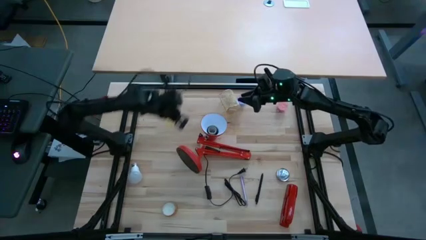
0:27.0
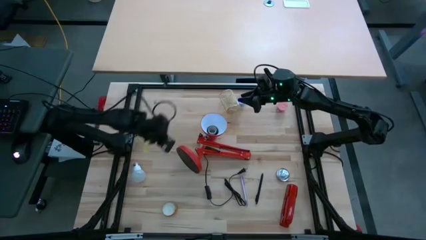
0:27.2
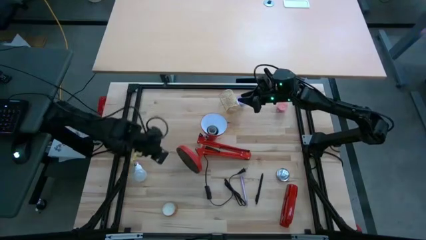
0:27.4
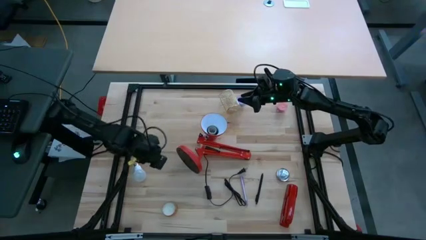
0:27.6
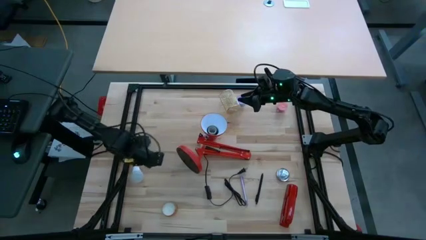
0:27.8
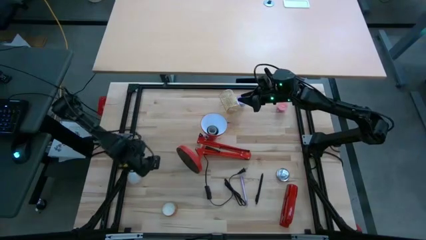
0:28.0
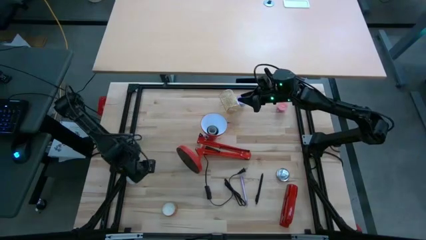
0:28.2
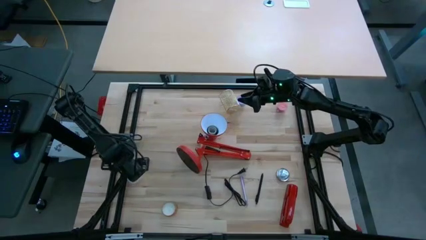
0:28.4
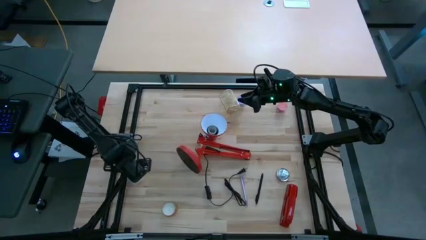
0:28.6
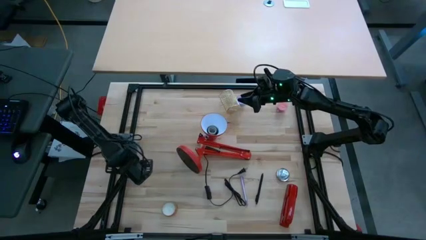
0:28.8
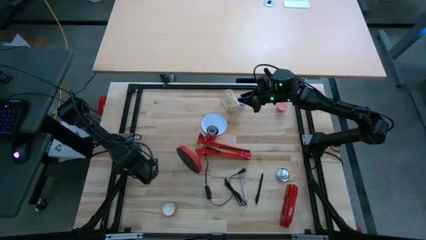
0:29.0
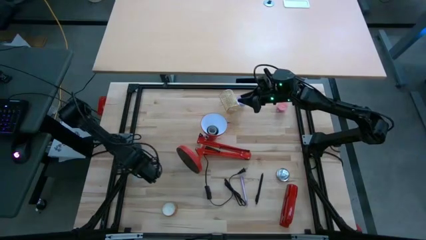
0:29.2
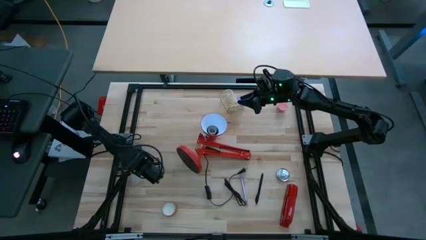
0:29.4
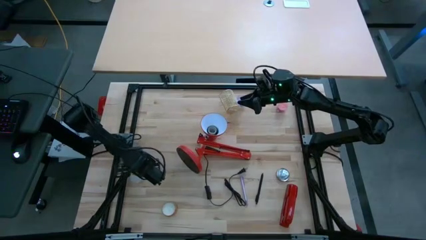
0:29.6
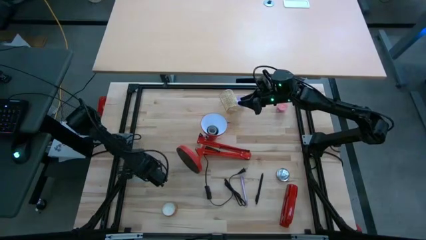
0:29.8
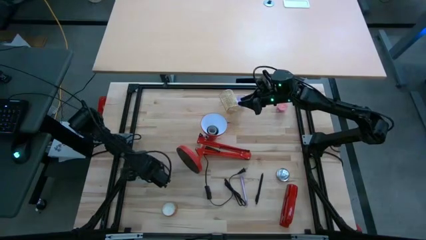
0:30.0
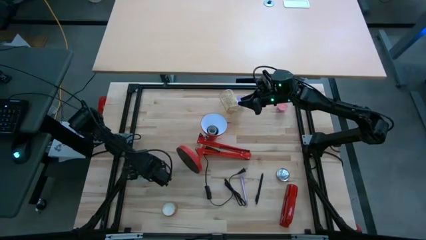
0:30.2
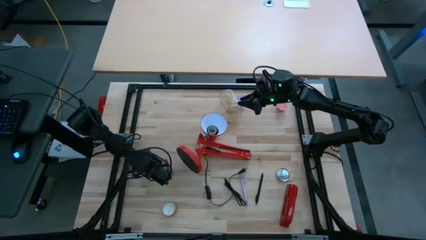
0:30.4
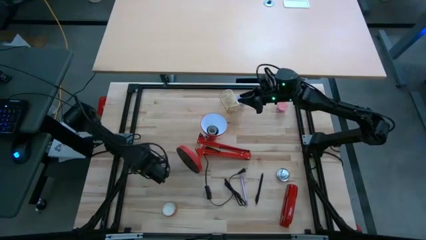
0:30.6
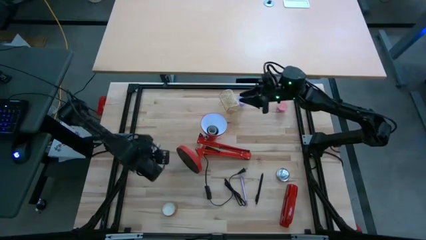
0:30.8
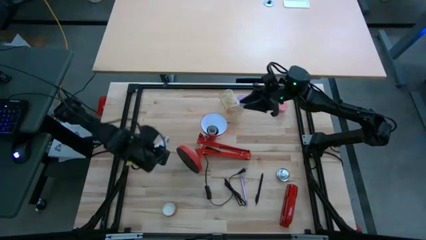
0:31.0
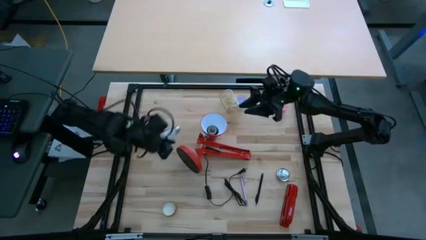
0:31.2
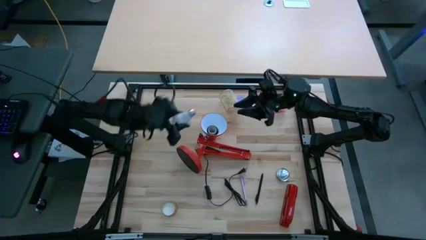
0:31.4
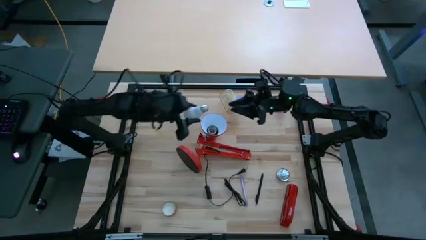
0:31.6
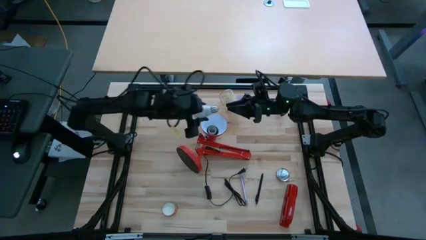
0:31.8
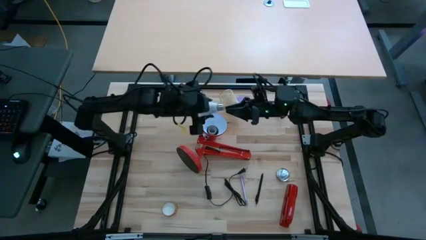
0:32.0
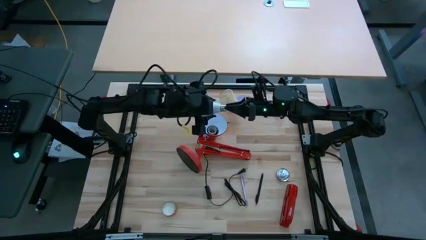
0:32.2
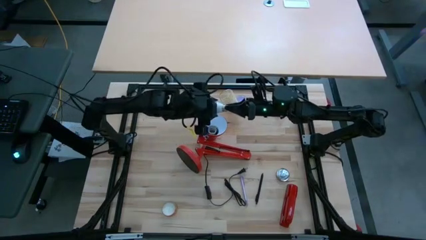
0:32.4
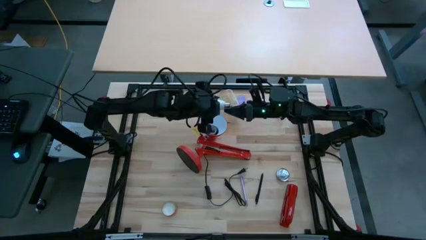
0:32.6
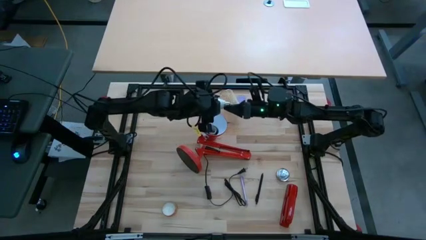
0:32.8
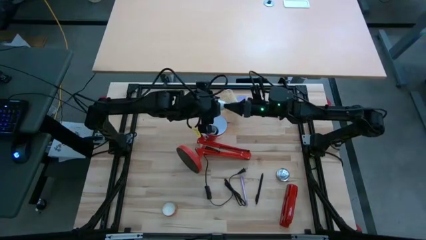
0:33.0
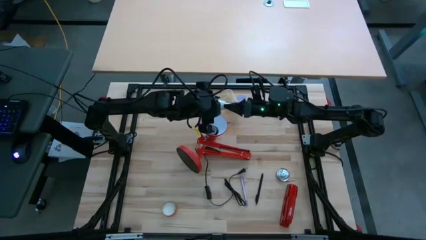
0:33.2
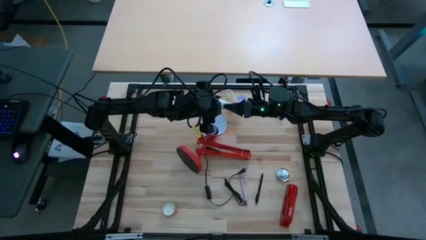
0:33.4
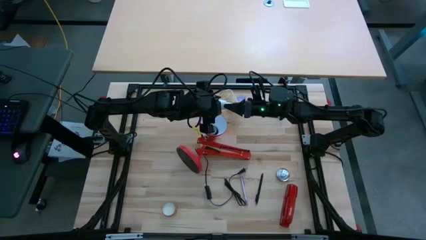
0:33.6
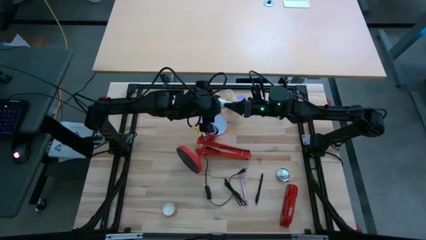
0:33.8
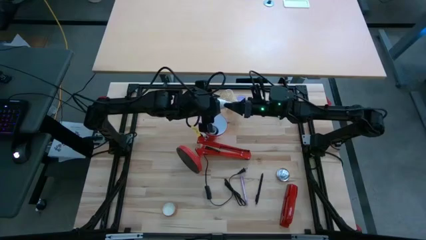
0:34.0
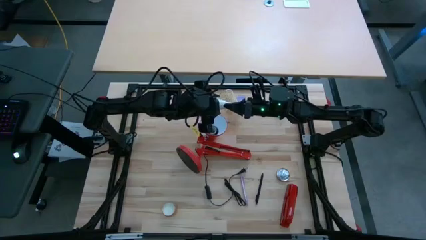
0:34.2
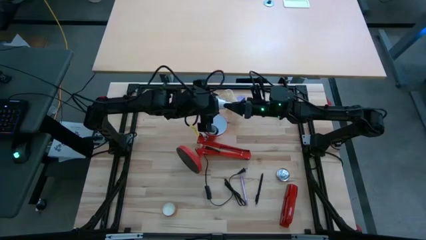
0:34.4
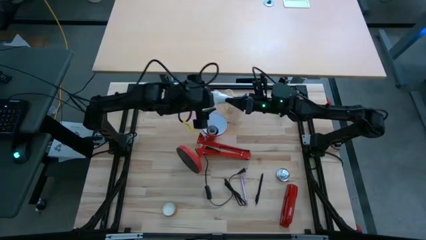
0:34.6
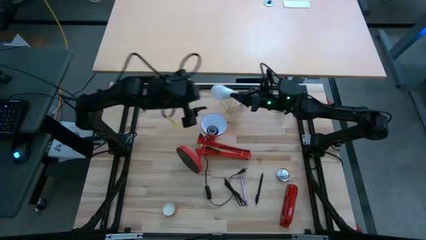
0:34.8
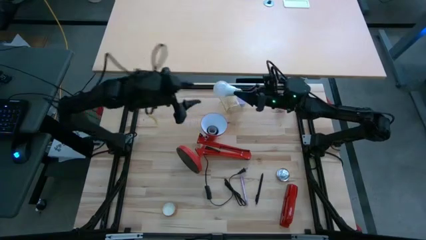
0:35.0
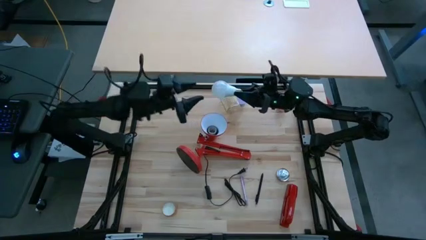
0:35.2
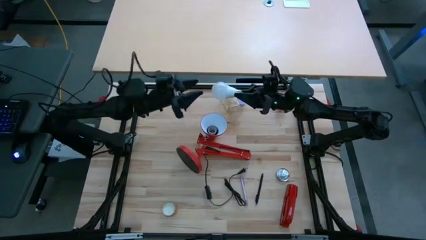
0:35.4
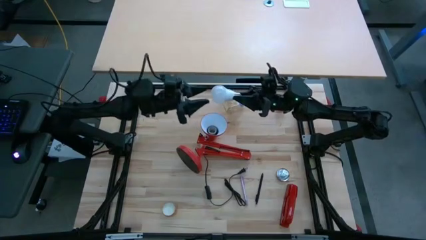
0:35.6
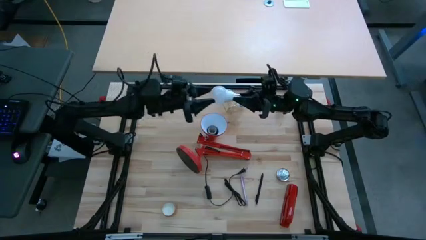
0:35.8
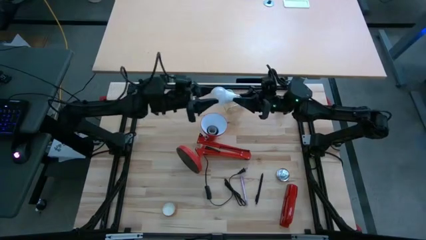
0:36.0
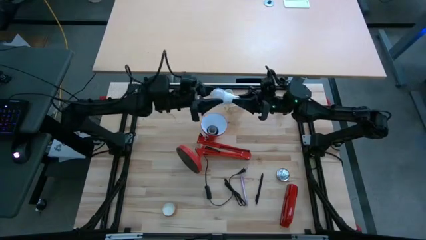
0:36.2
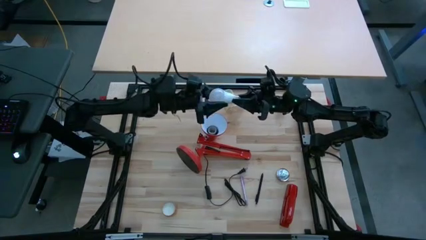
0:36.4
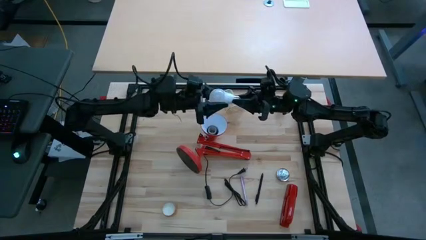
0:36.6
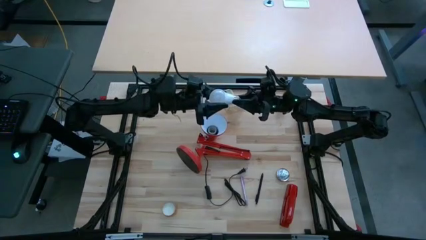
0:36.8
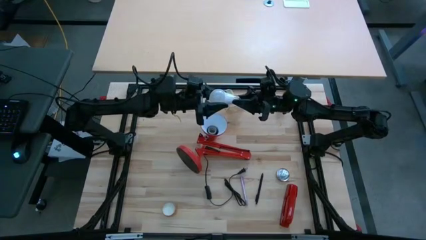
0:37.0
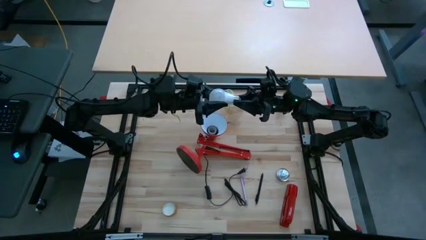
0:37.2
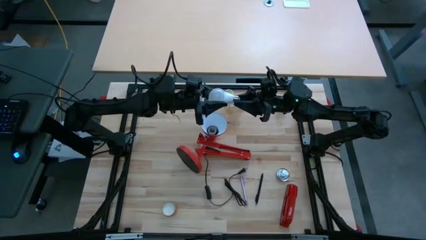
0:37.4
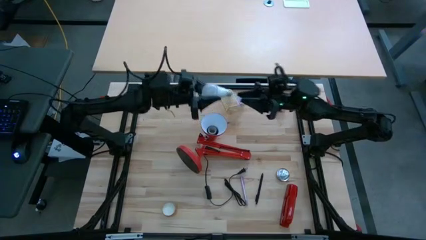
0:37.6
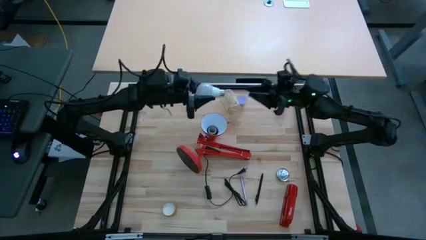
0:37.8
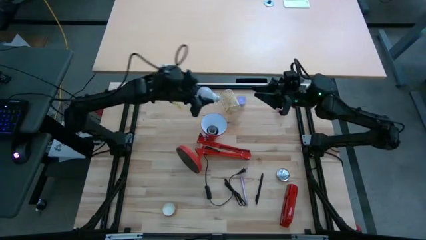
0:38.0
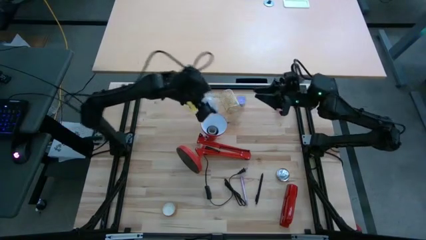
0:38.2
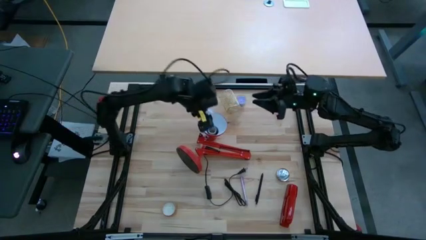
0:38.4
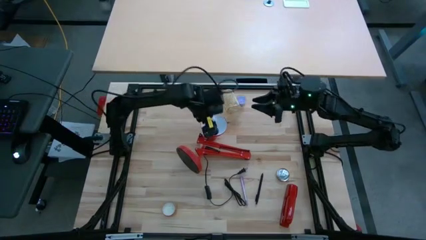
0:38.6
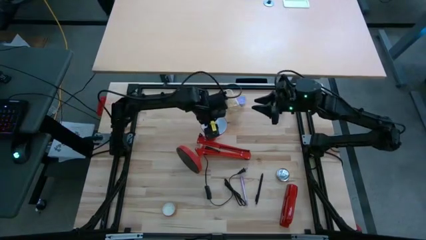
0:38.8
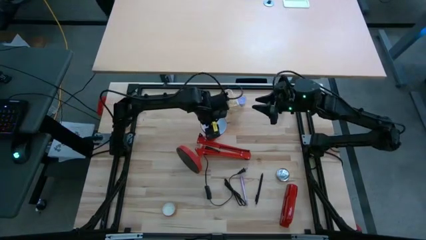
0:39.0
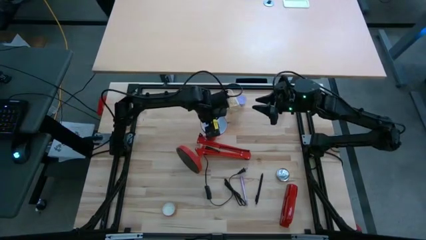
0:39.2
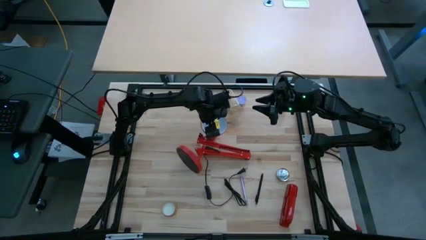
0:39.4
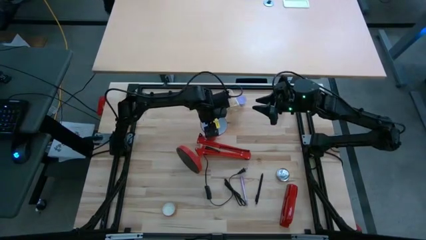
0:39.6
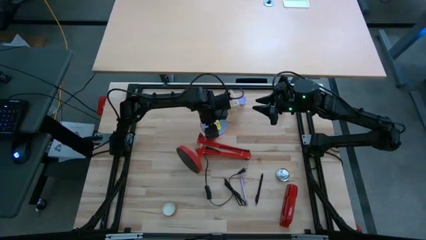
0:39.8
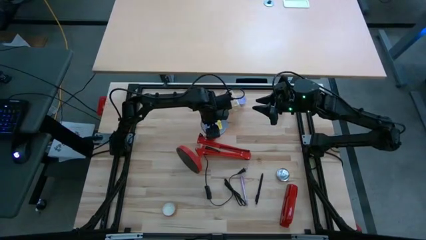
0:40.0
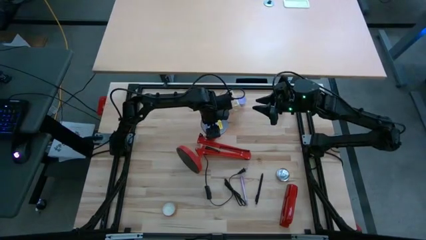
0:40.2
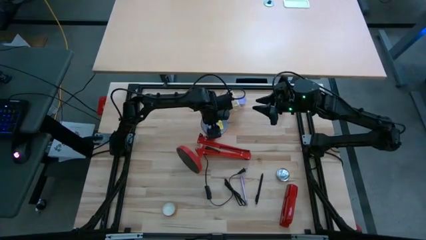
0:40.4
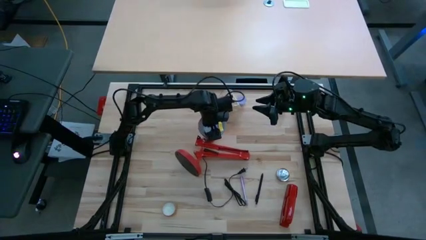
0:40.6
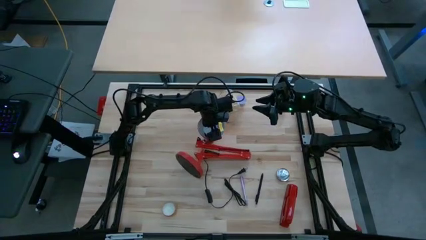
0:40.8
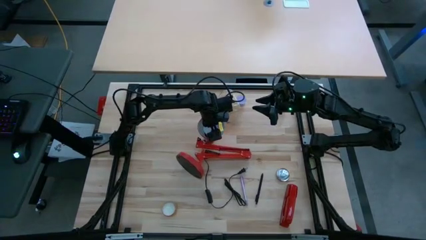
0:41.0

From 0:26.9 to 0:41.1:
Task: Screw lightbulb
Insert the white lightbulb into the desk lamp
